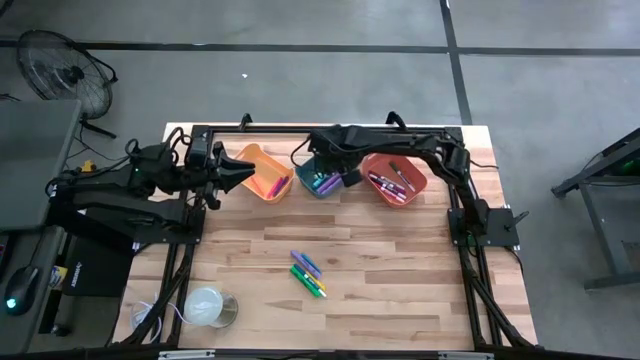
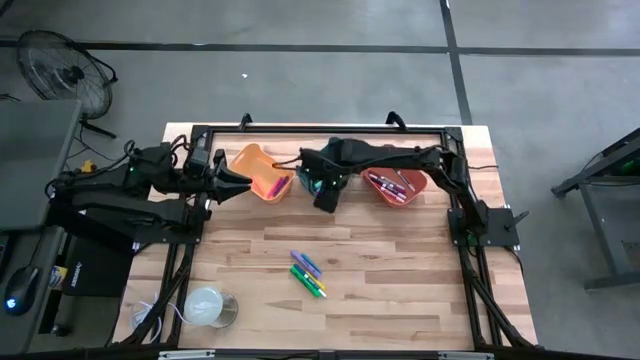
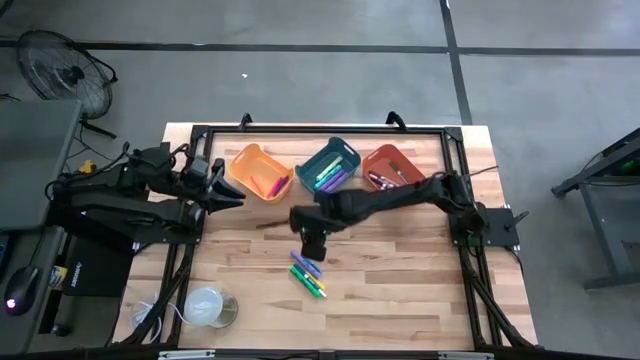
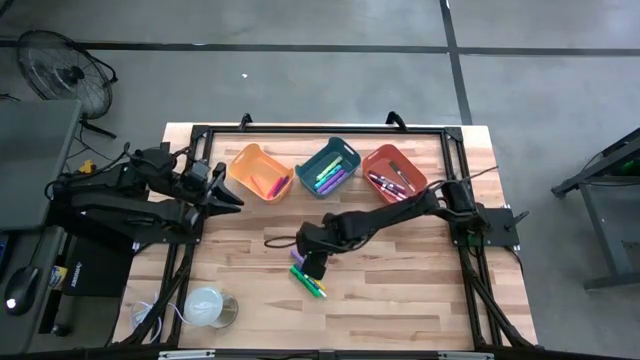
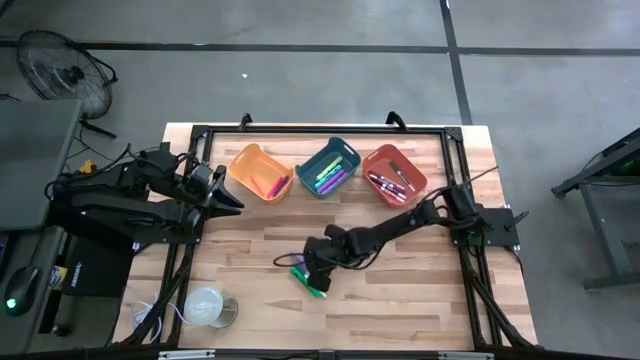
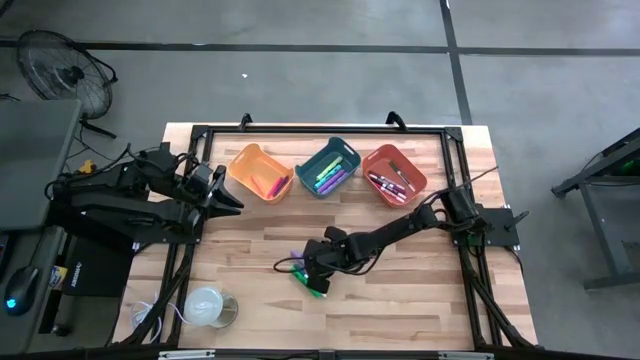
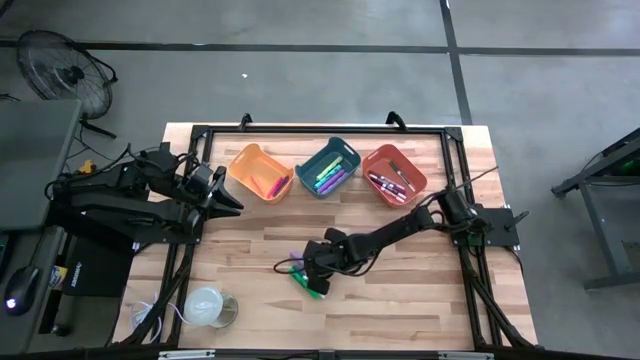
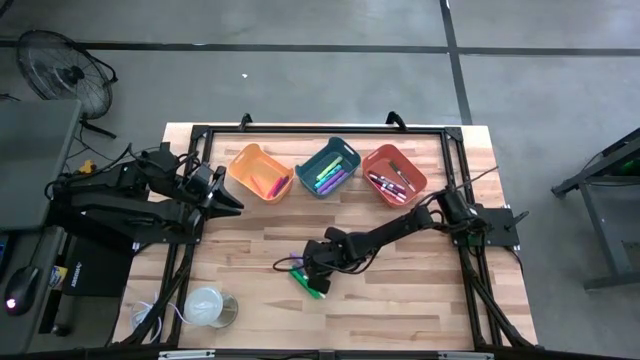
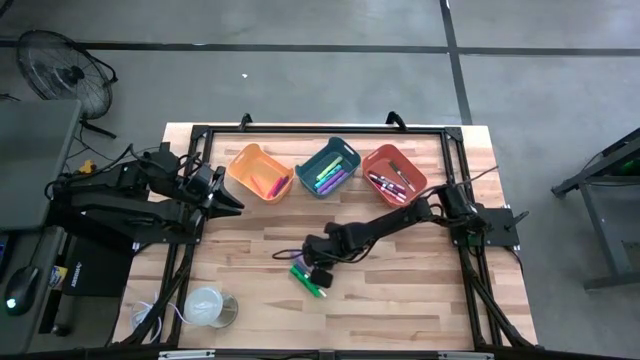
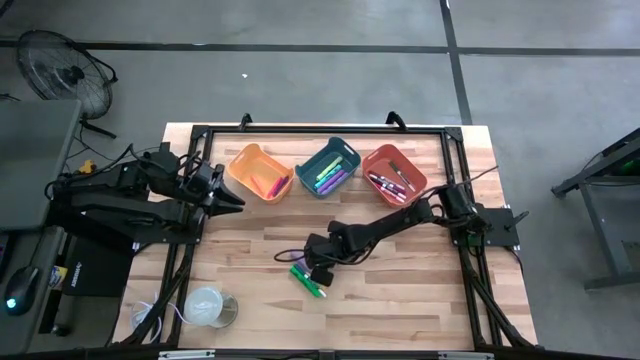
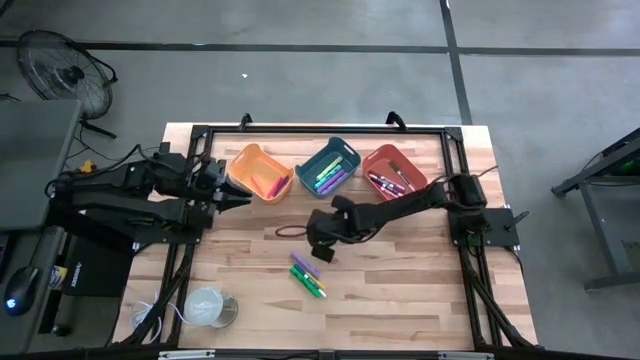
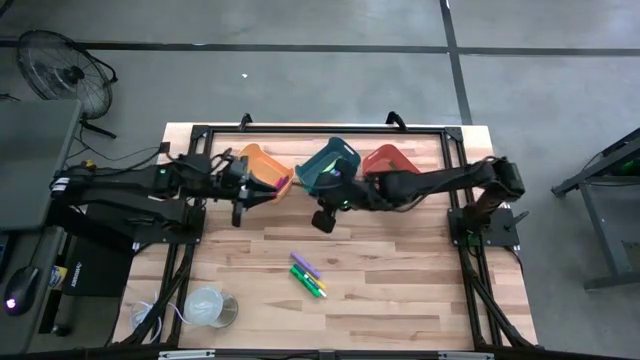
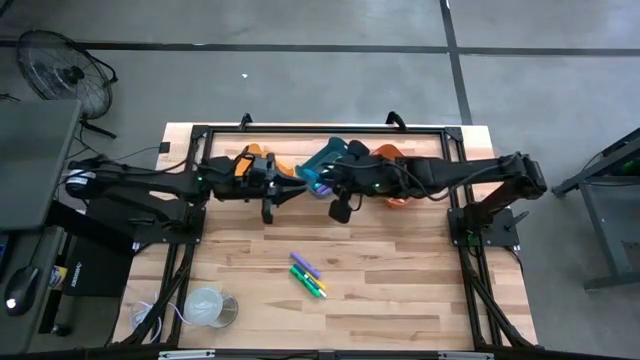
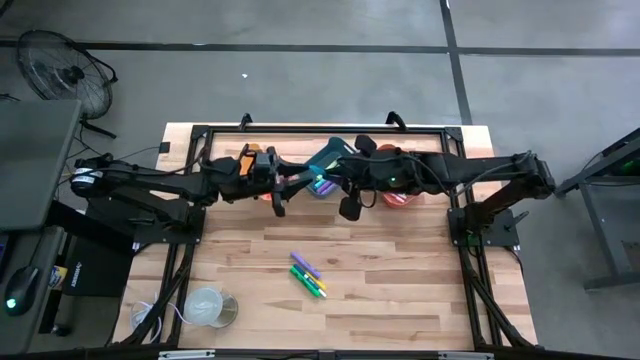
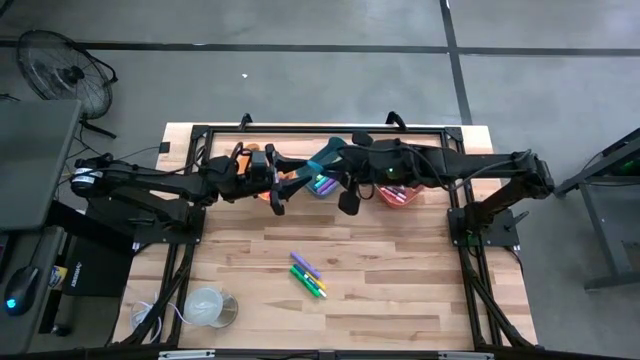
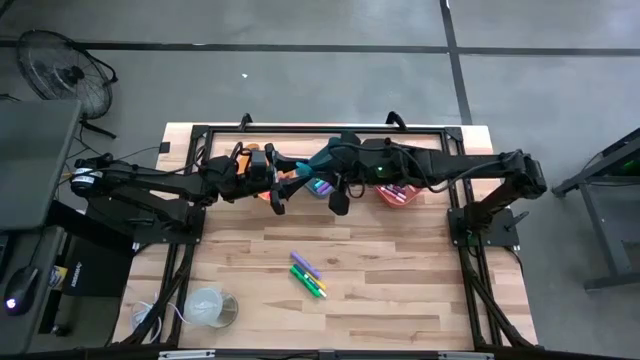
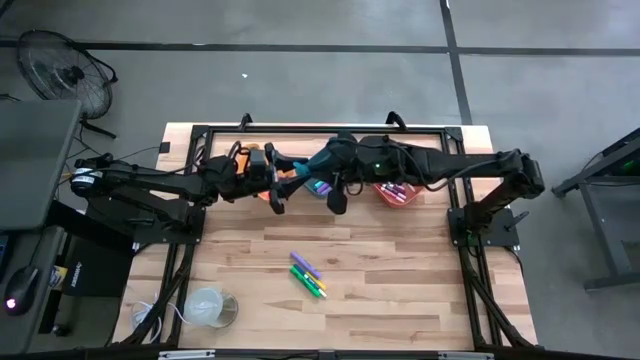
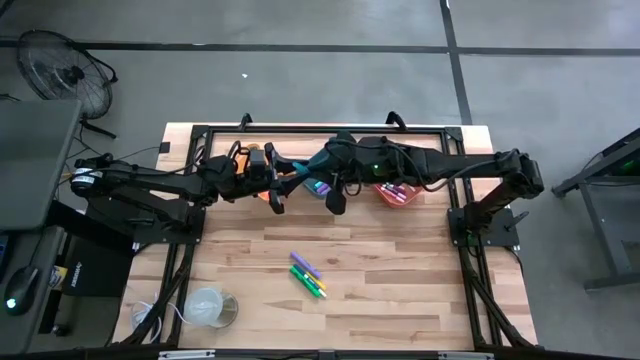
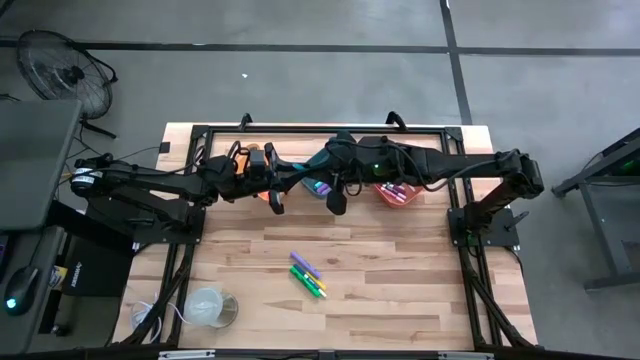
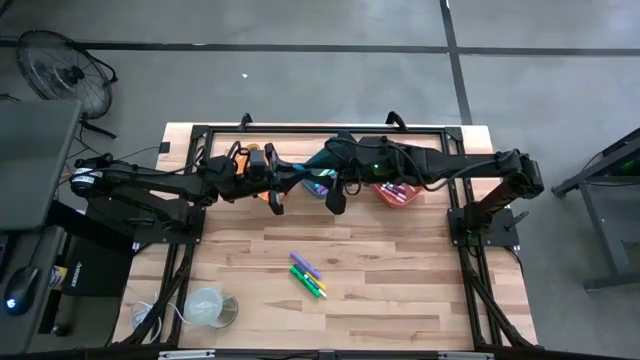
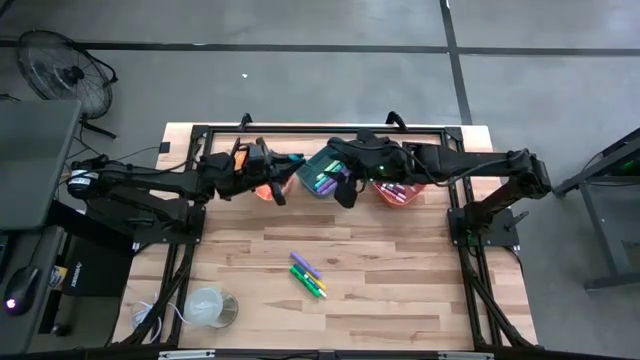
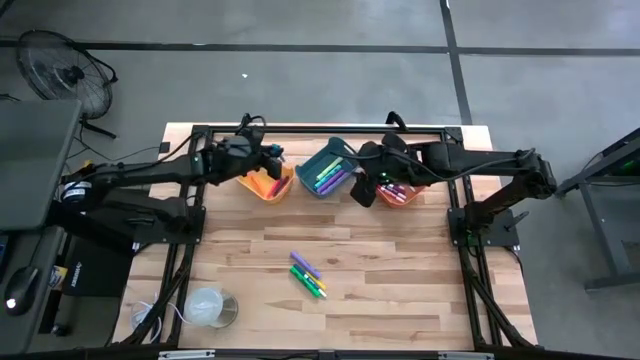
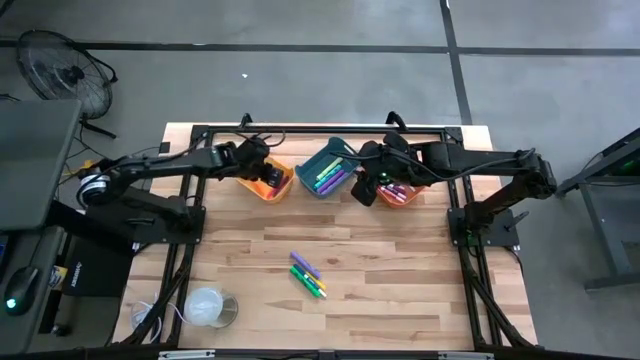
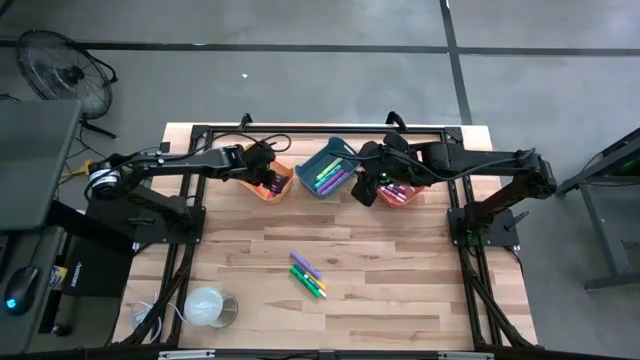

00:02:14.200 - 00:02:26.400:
Task: Pick & Place Markers
Put the blue pen into the yellow bin

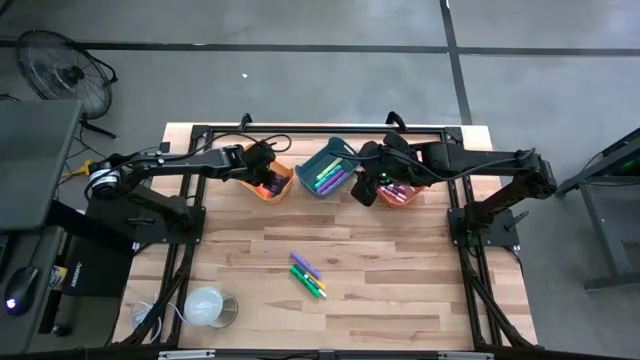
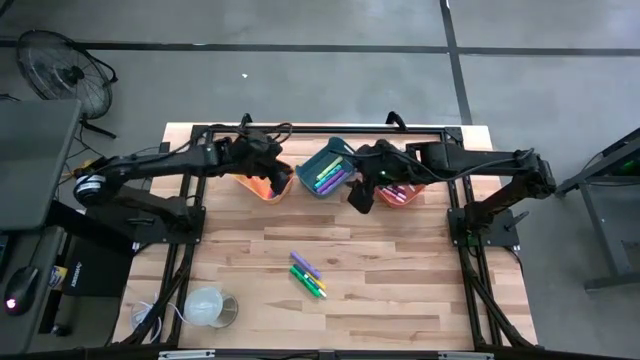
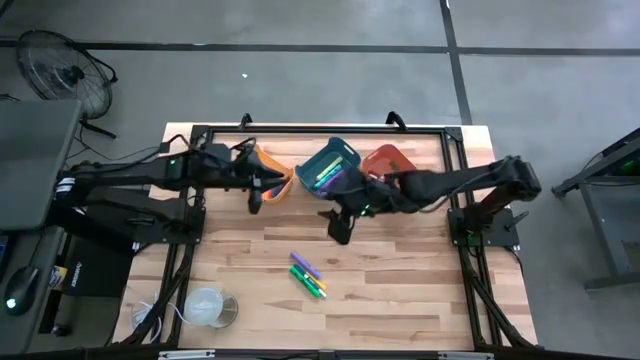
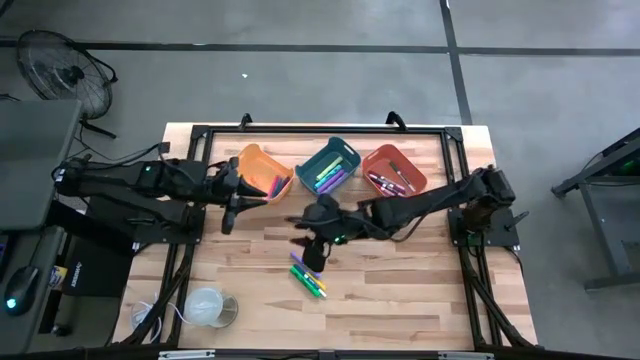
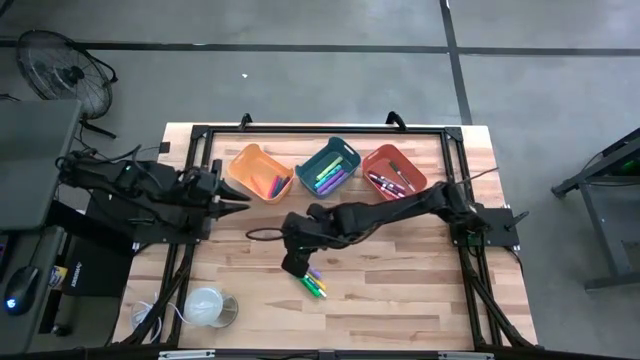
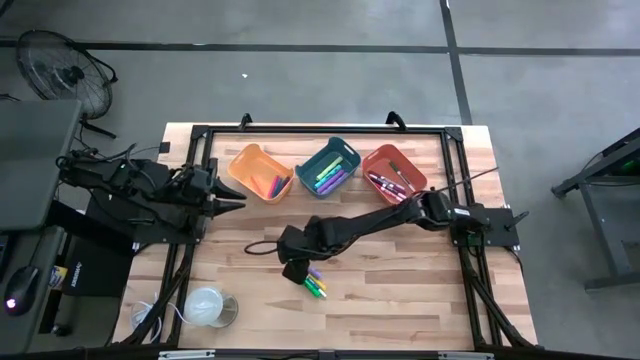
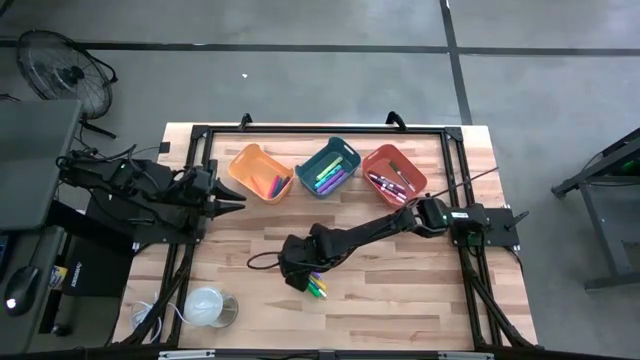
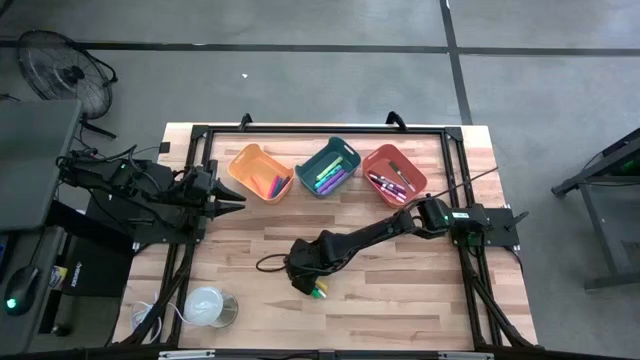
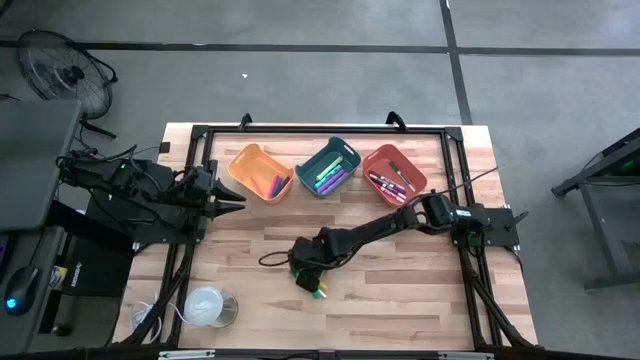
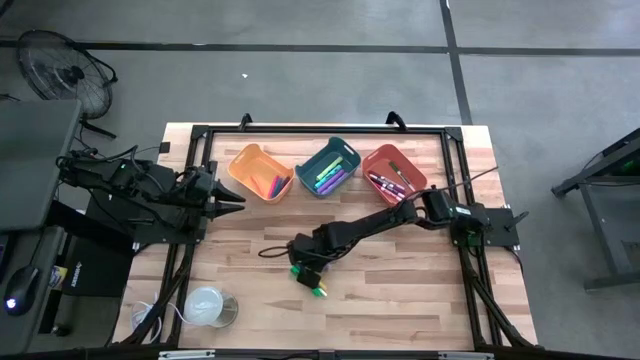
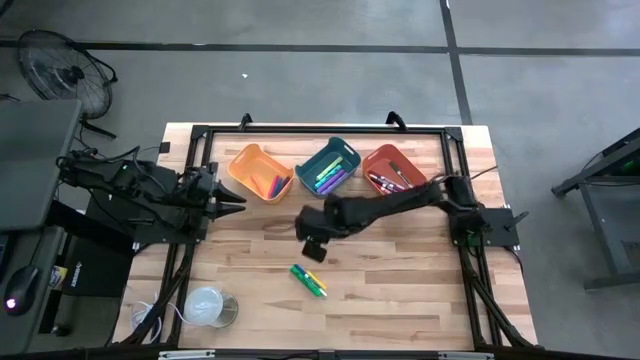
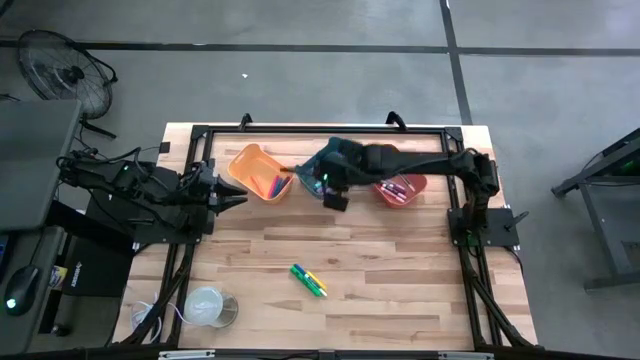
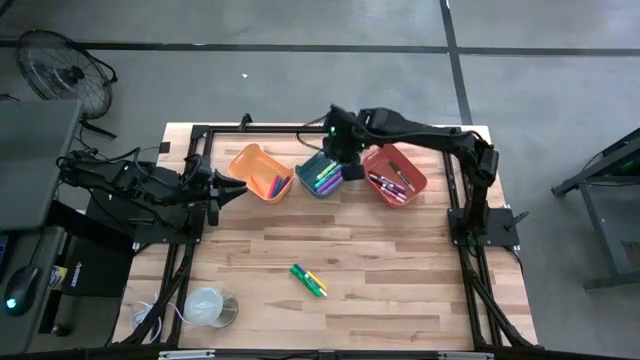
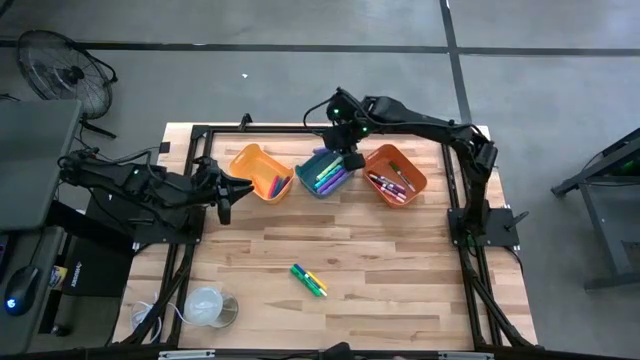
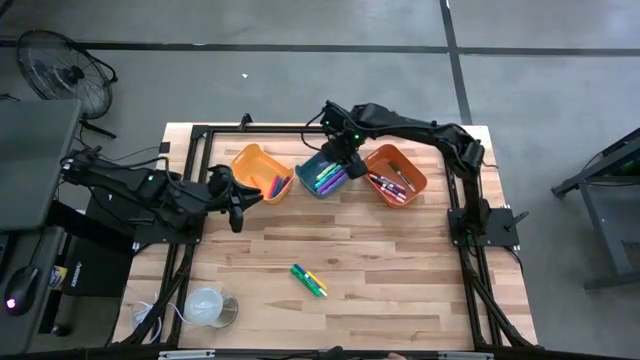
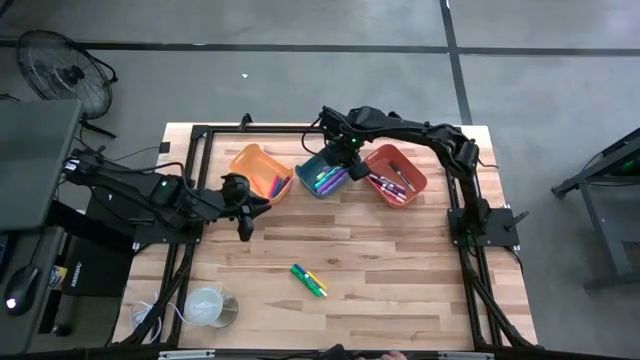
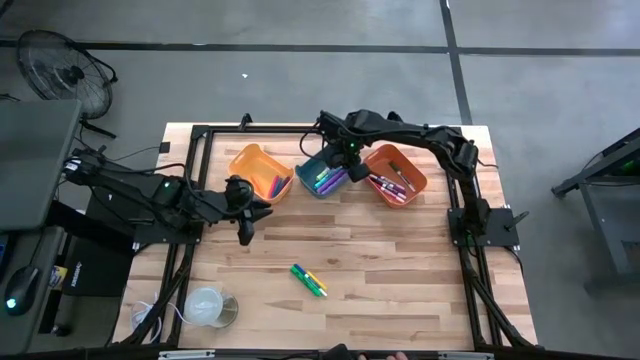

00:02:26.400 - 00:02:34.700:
Put the purple highlighter pen into the blue bin
